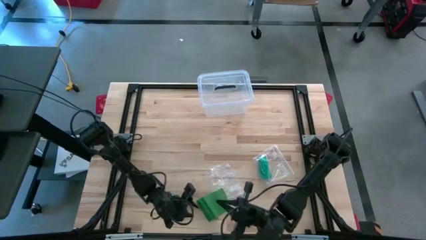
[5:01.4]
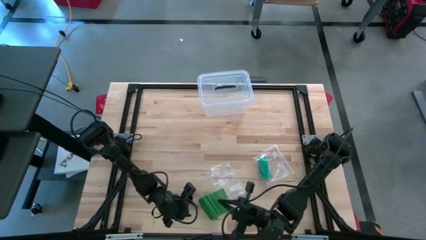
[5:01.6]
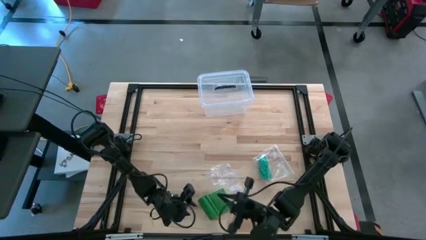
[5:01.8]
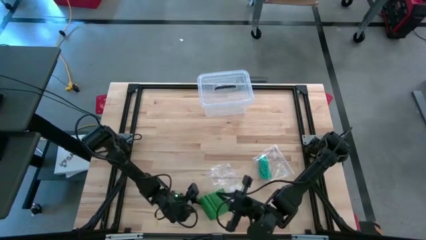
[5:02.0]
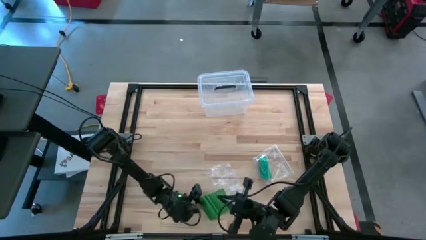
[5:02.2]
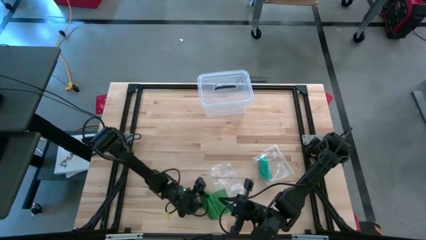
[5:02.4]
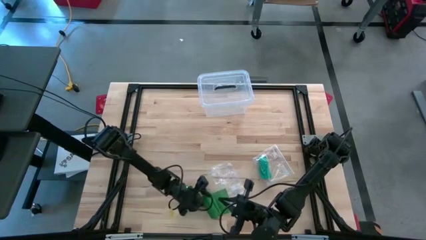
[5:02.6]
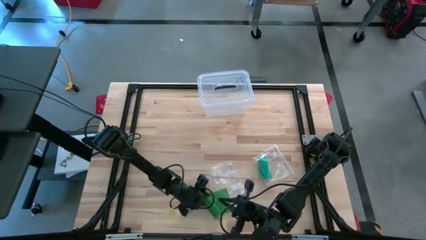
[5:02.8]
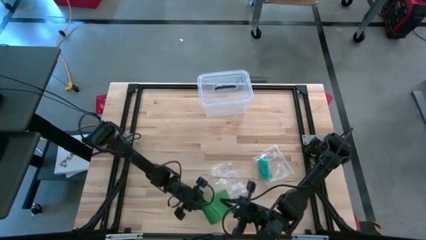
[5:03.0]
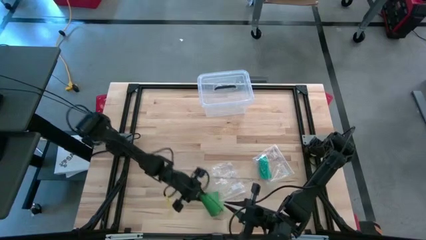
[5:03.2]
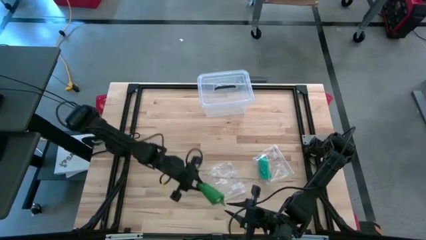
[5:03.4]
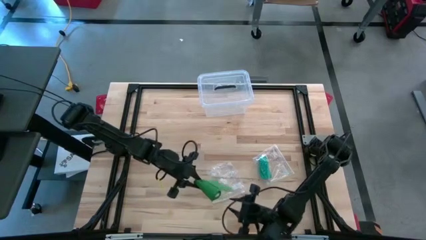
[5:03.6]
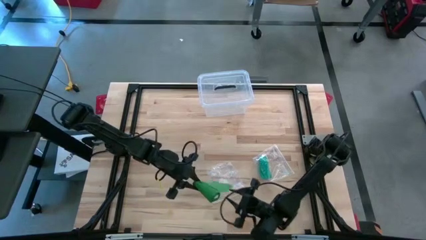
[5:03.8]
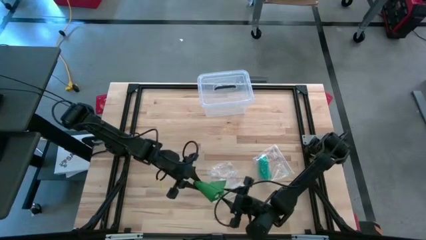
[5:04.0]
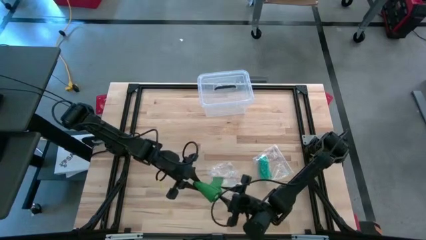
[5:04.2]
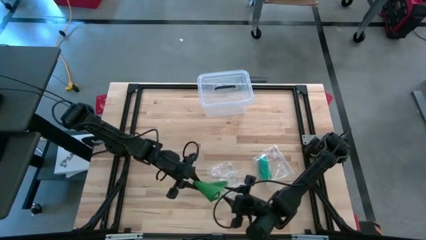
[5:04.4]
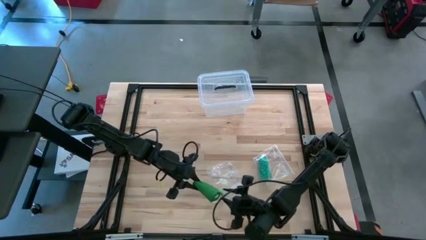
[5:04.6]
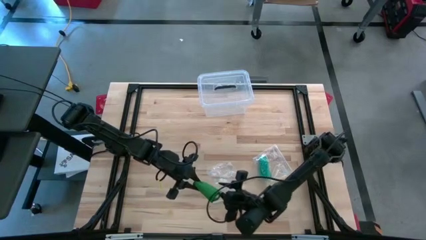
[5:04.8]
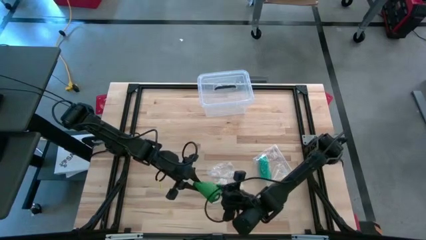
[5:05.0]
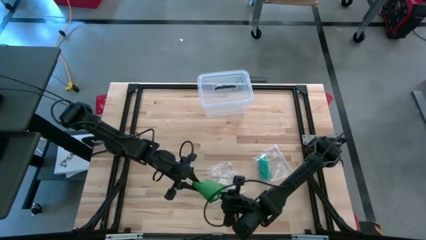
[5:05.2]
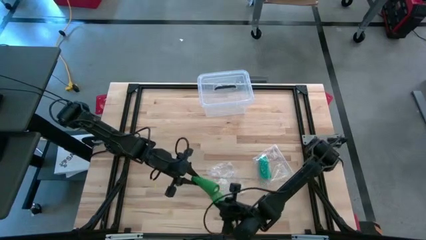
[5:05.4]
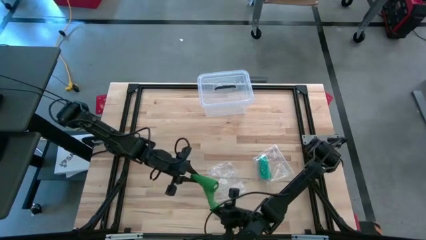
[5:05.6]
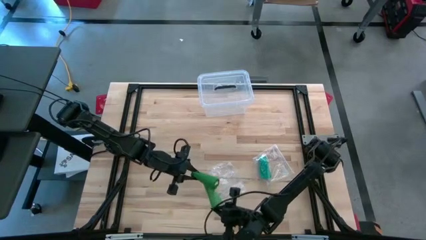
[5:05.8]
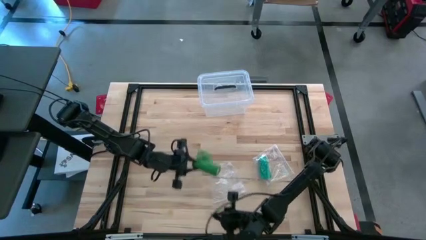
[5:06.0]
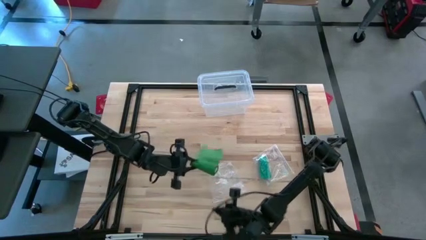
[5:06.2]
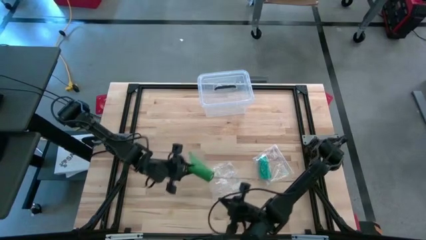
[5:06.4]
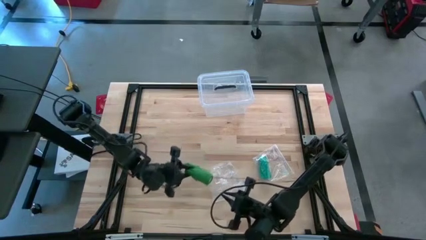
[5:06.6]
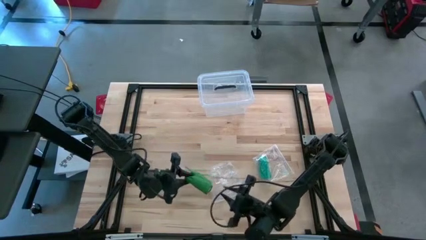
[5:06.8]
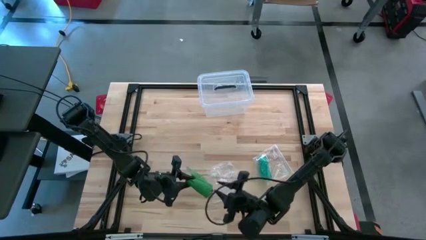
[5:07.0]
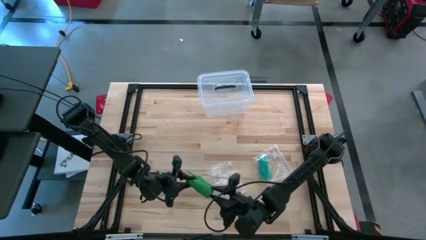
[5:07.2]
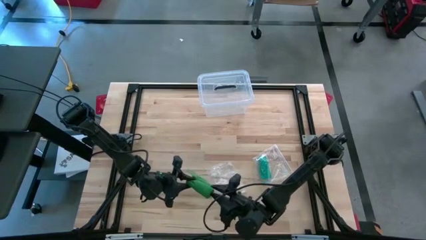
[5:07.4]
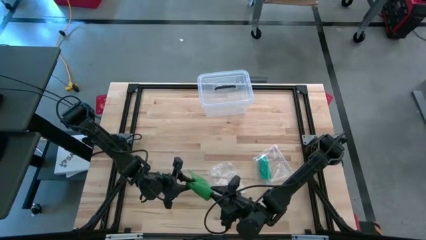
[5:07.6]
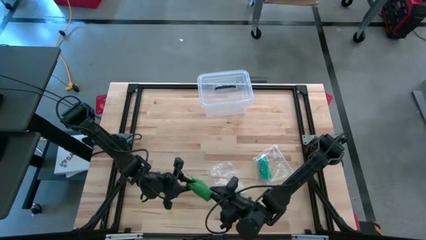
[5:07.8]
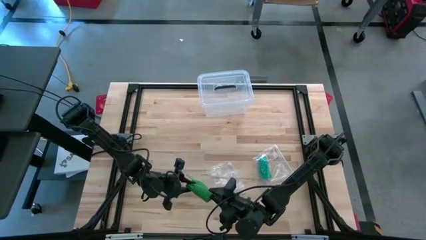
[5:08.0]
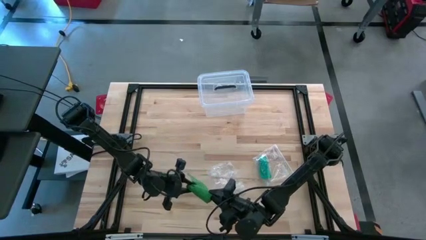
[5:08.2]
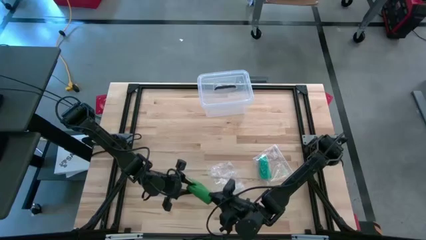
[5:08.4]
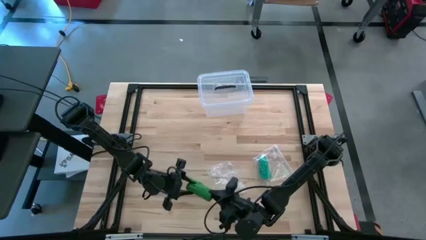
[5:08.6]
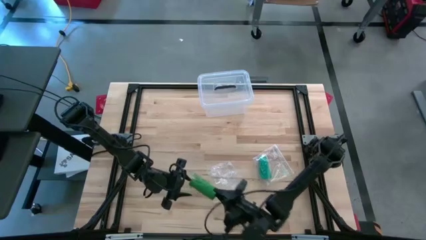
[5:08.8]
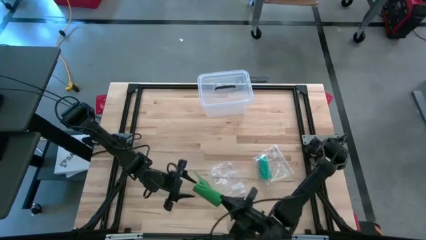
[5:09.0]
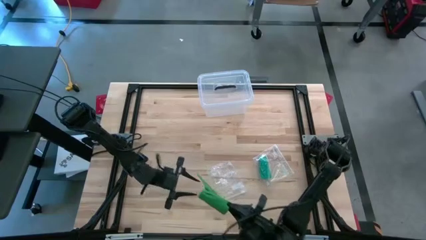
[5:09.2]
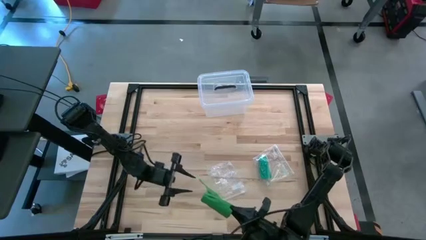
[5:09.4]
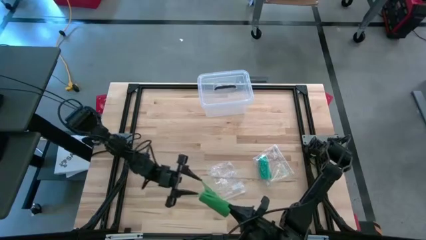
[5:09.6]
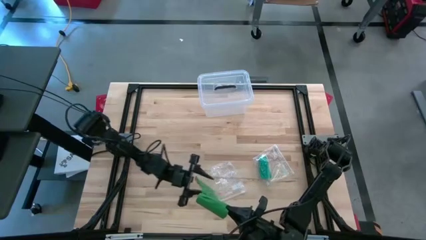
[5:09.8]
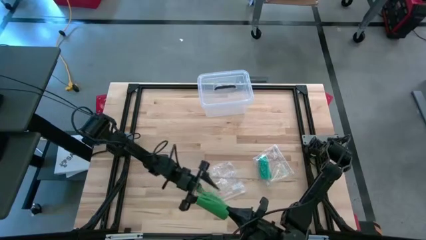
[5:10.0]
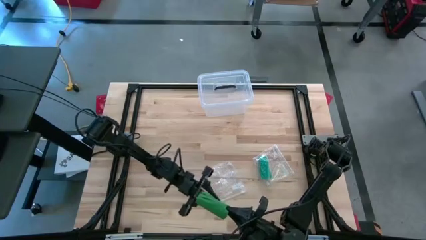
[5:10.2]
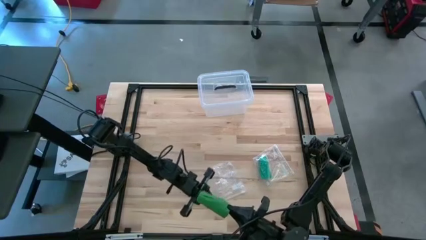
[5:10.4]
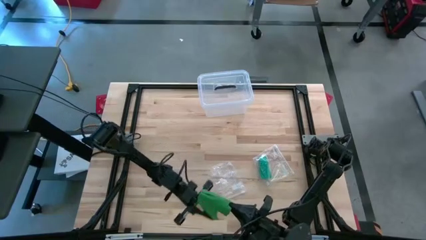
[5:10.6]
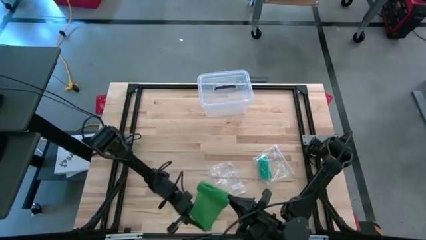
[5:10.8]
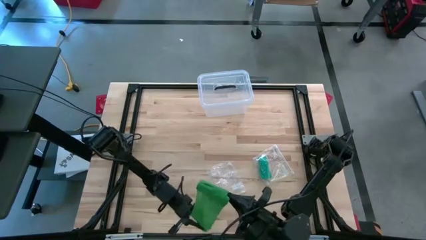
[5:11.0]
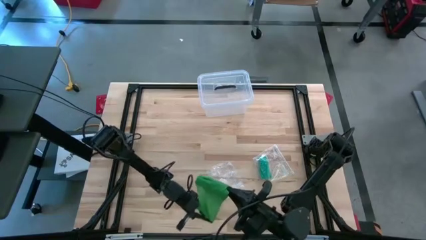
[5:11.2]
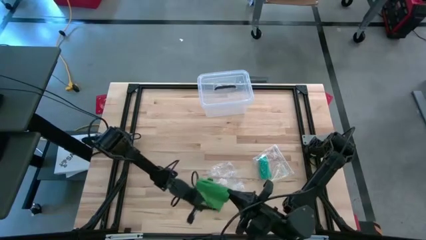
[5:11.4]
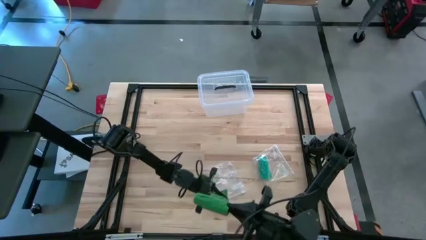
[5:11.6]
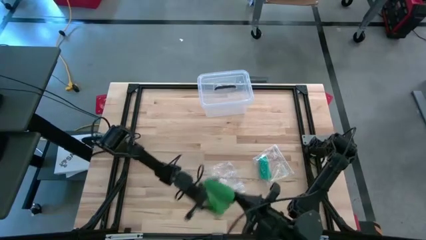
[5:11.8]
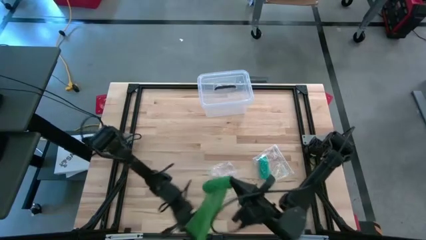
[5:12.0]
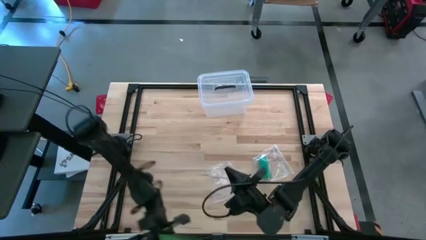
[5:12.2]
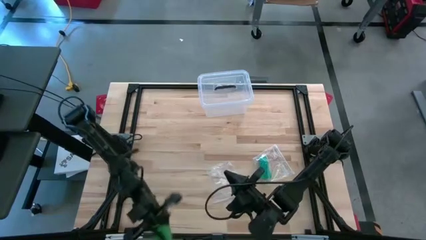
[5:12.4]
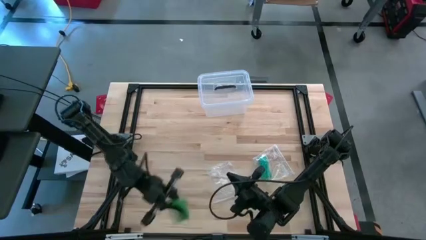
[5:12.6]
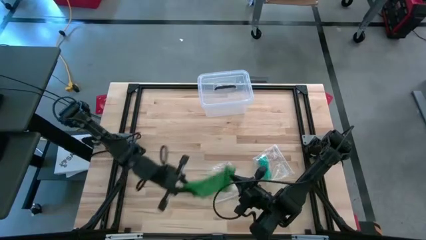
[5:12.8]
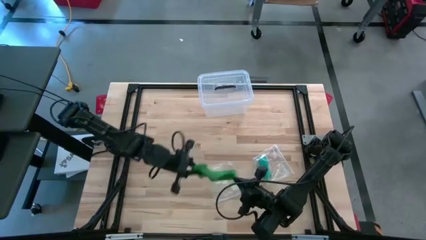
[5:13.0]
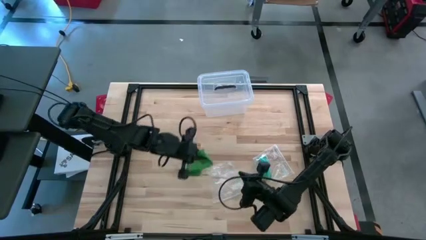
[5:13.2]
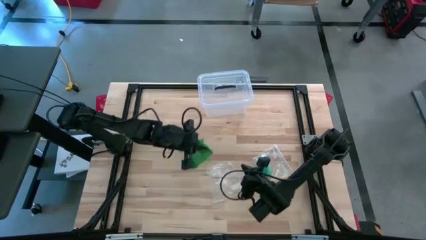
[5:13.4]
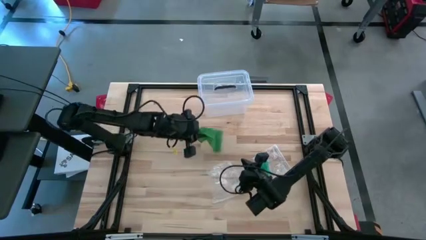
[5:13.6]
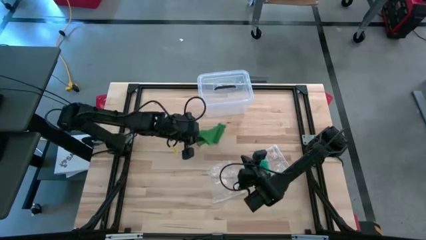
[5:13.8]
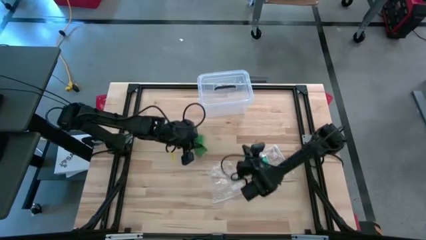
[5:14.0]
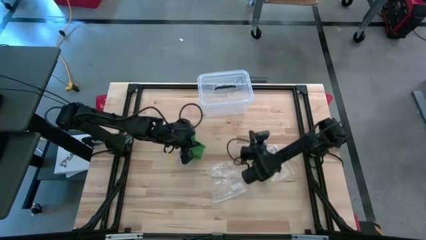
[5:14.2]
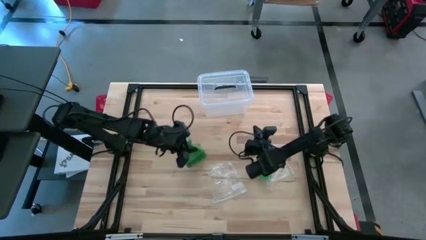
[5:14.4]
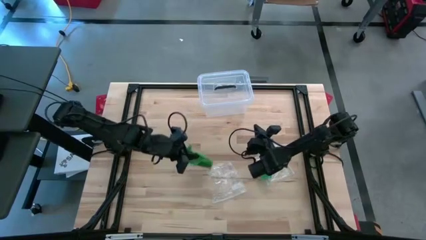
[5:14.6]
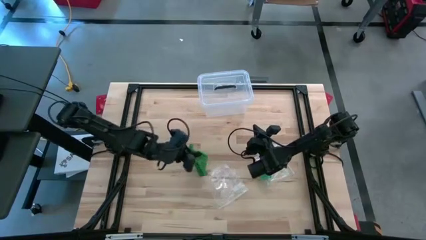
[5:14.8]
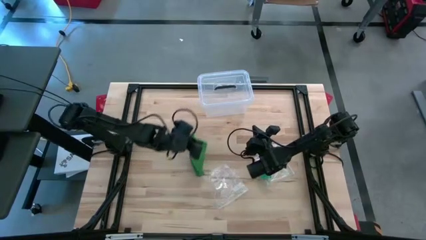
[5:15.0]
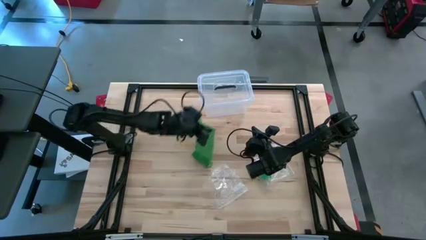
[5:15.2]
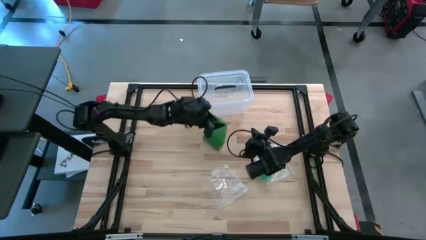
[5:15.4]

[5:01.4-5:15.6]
Task: Roll bandage
Roll the green bandage

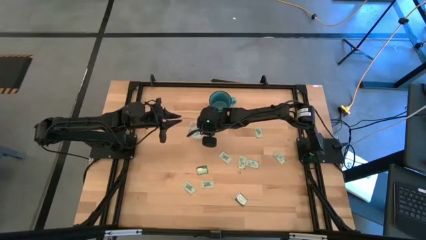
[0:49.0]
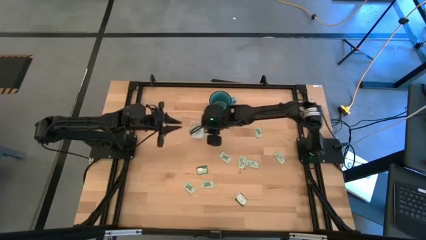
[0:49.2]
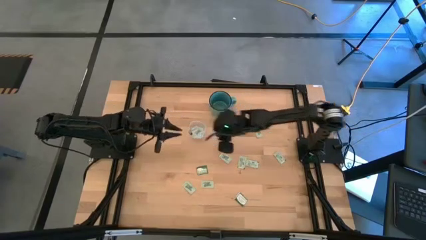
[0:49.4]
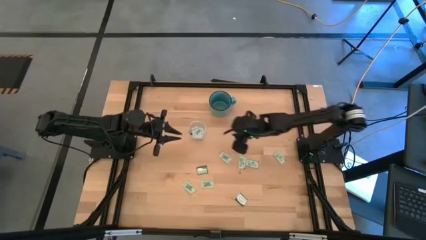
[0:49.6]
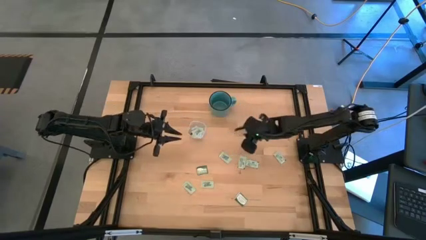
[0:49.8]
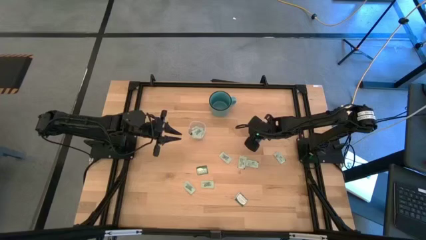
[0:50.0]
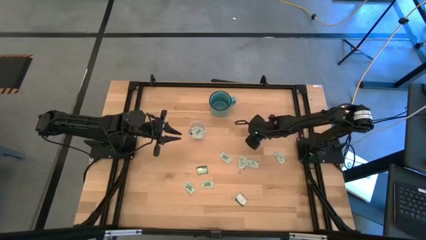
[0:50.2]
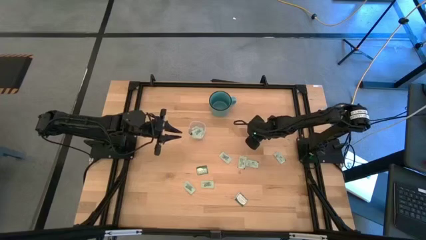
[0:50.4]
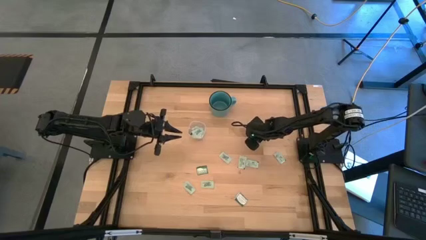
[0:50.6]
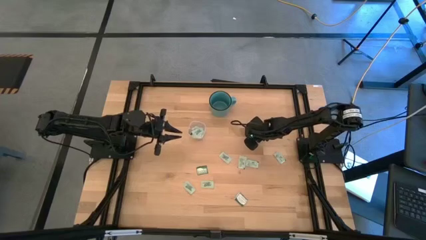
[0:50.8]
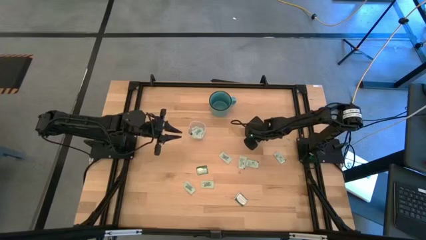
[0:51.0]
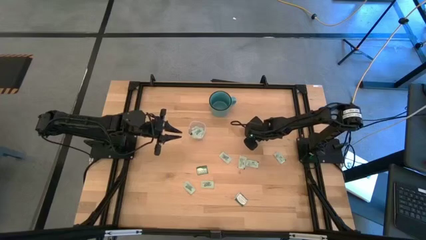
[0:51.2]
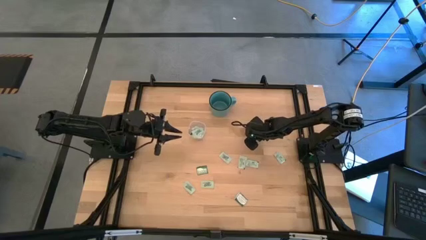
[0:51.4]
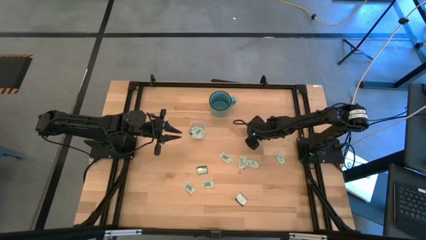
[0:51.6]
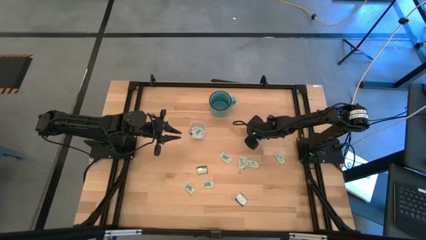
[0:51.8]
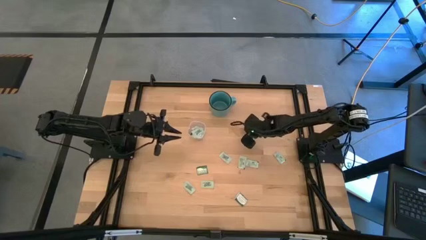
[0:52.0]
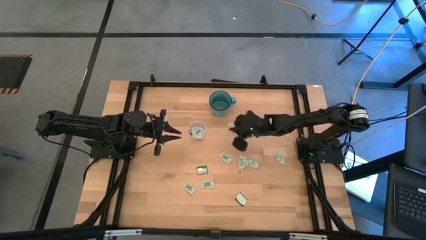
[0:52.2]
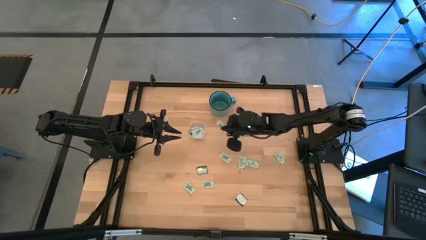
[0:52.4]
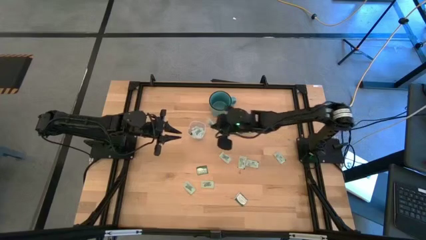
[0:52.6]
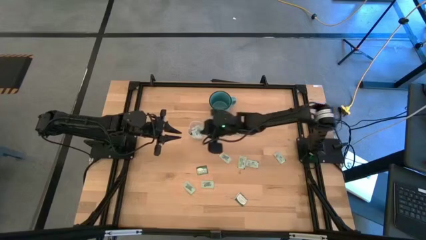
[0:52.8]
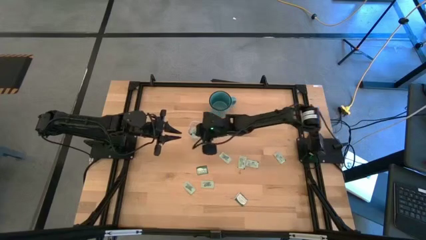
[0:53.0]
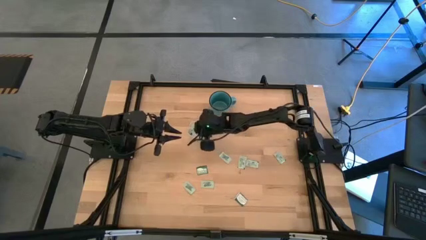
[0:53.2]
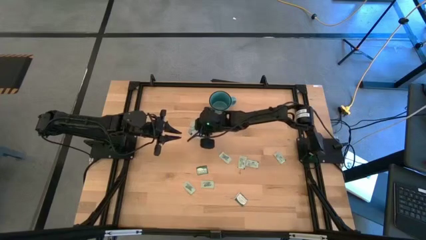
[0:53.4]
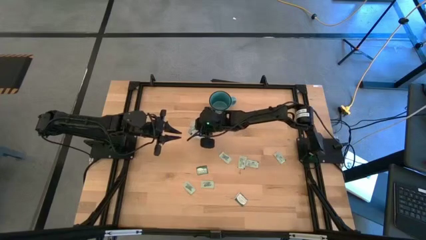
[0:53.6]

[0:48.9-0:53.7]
Task: Pick and place Stevia / Truvia into bins
Put the green stevia packet into the transparent container
